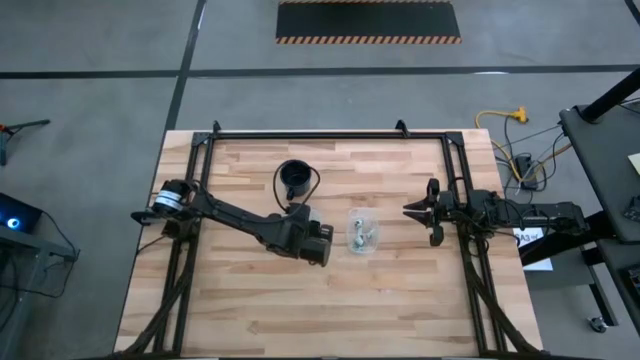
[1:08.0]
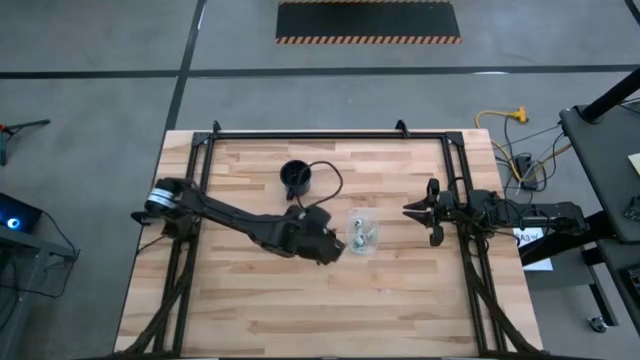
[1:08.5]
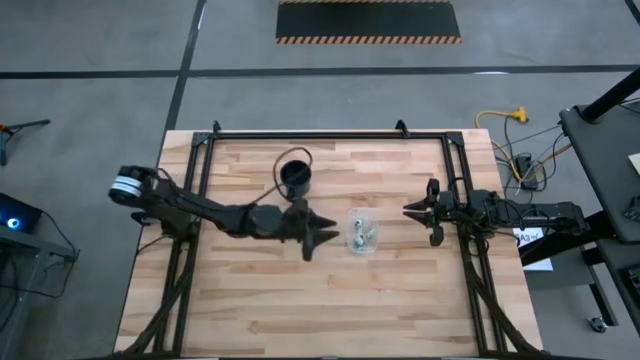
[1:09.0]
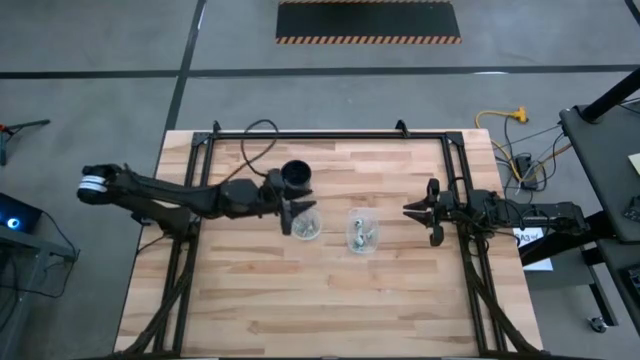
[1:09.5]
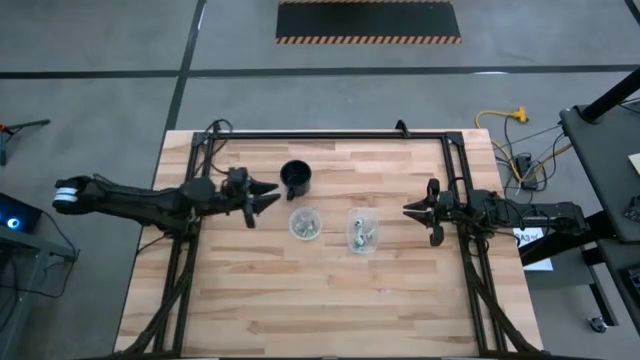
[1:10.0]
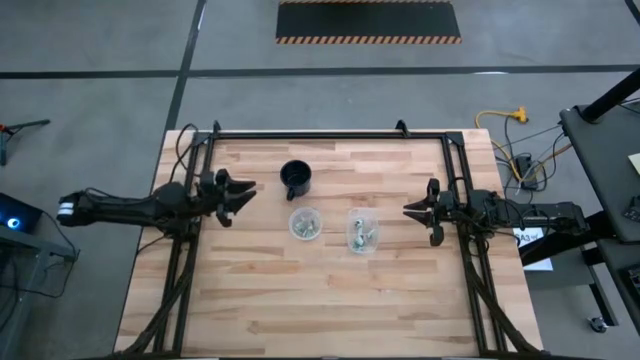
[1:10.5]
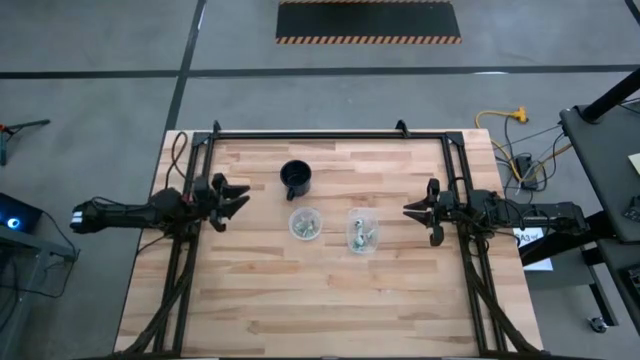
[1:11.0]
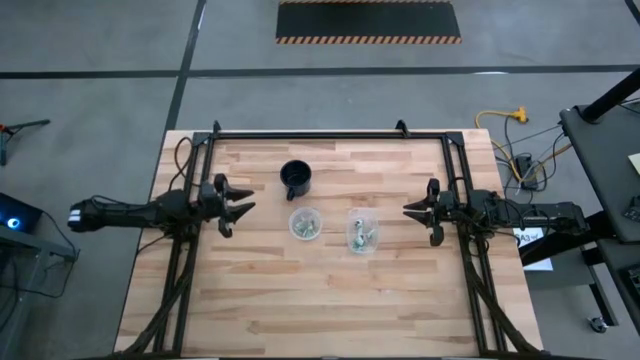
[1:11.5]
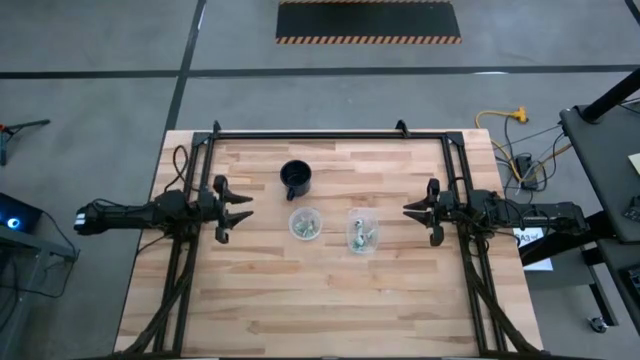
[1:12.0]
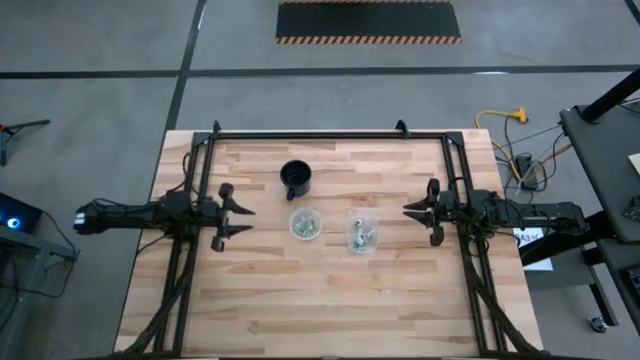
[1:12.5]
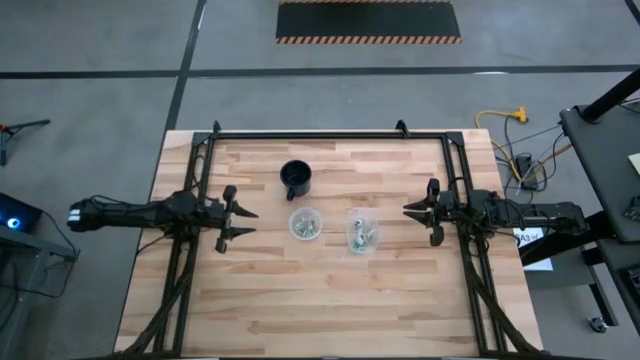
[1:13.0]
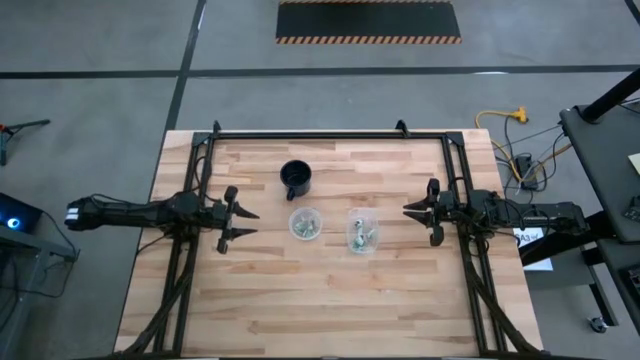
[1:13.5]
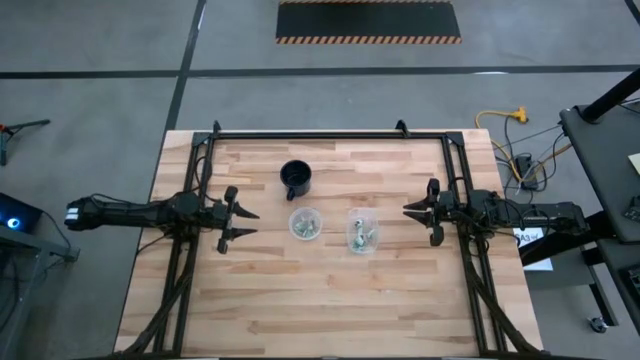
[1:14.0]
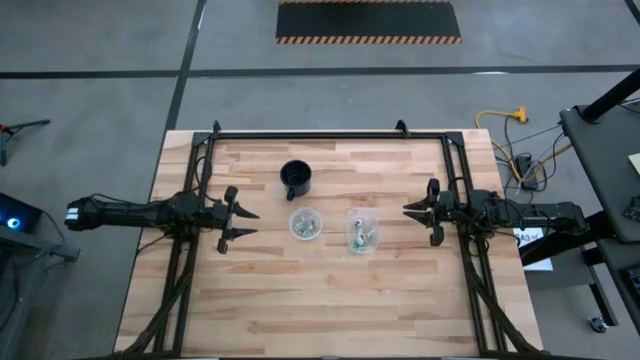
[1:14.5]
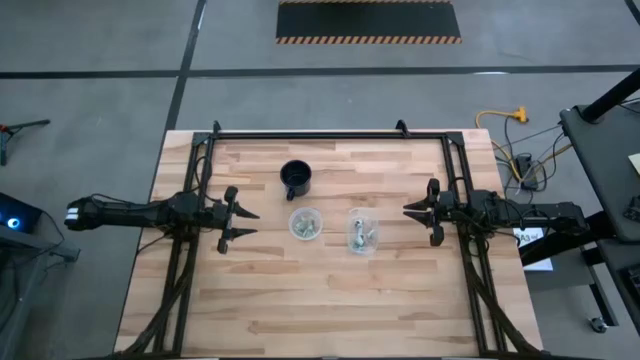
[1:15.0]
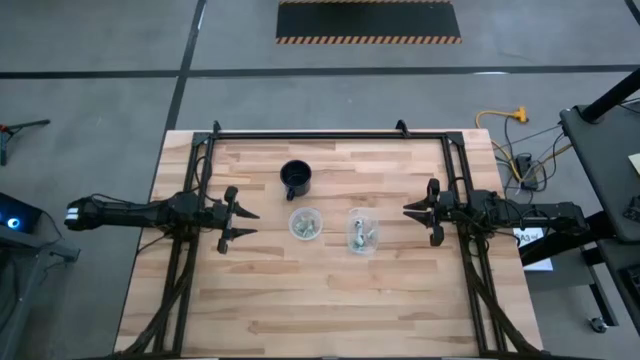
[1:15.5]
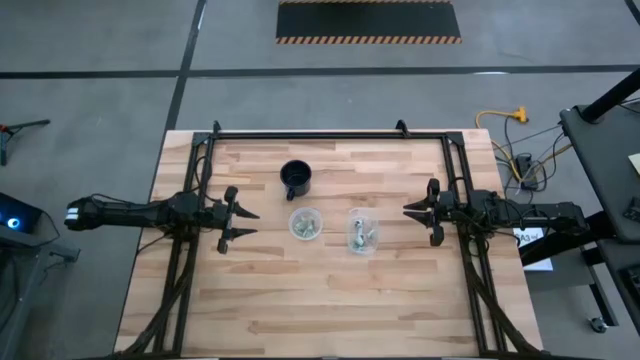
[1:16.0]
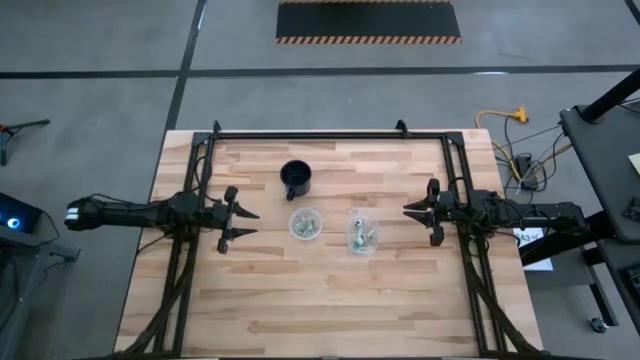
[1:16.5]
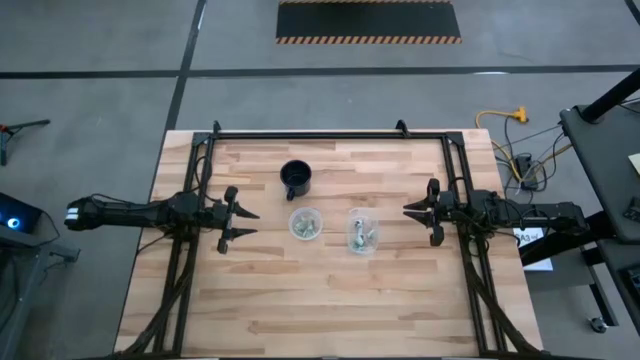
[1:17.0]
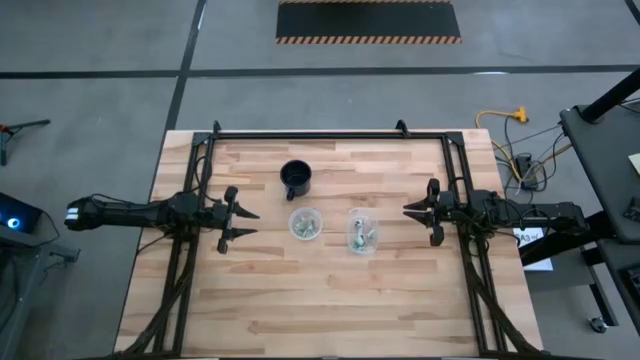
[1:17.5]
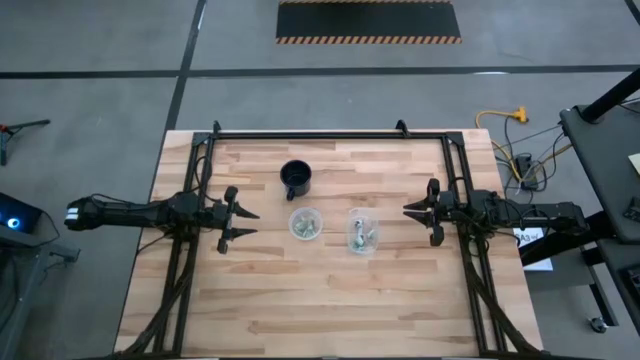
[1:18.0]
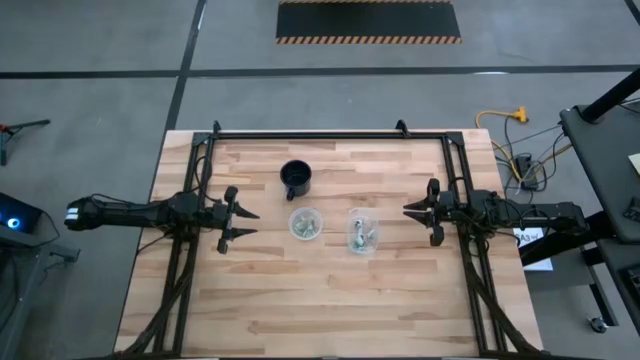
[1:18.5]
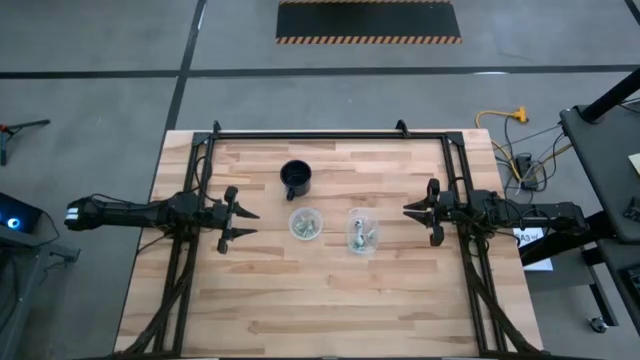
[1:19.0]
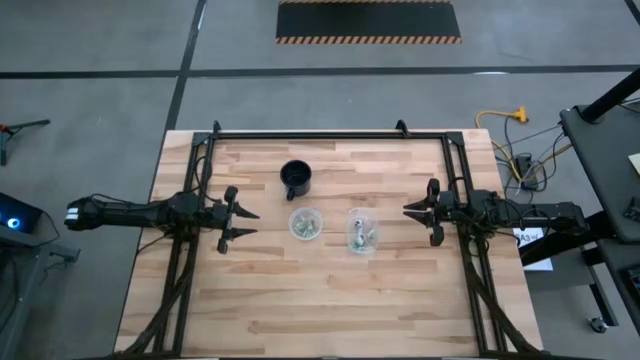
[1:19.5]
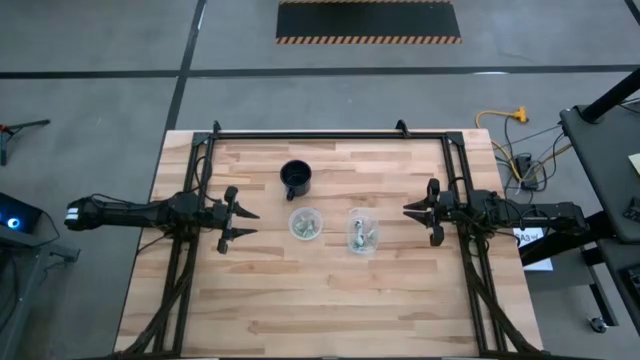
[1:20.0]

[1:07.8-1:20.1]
Task: Pick and place Stevia / Truvia into bins
Return to Home Position

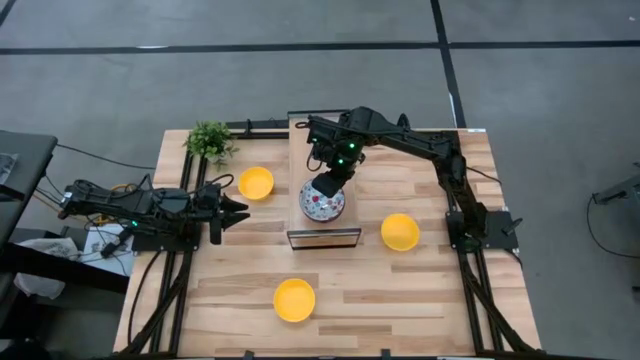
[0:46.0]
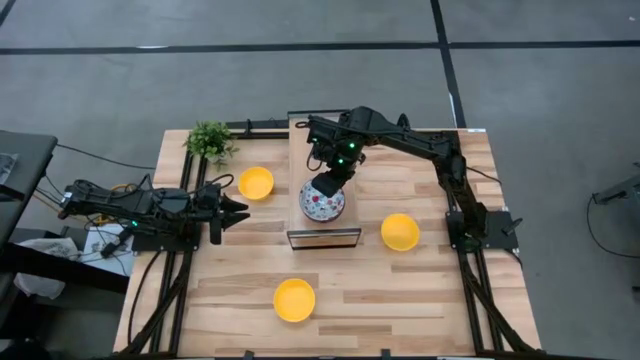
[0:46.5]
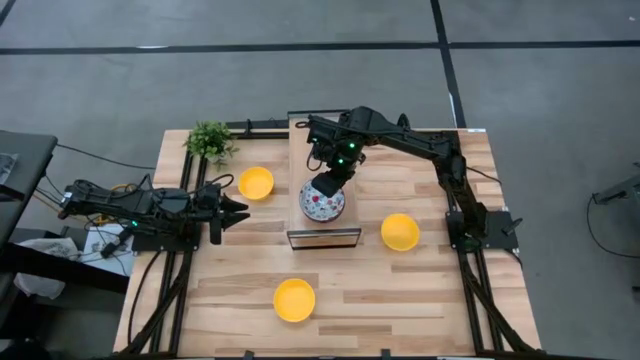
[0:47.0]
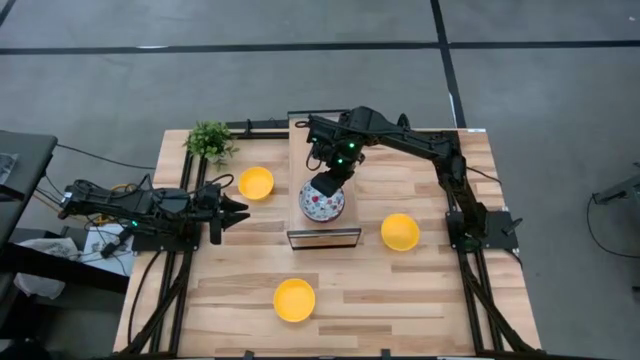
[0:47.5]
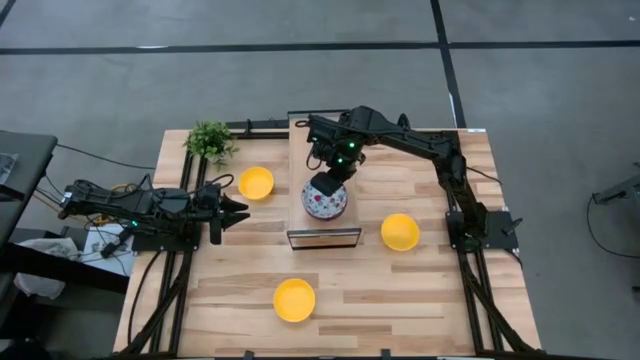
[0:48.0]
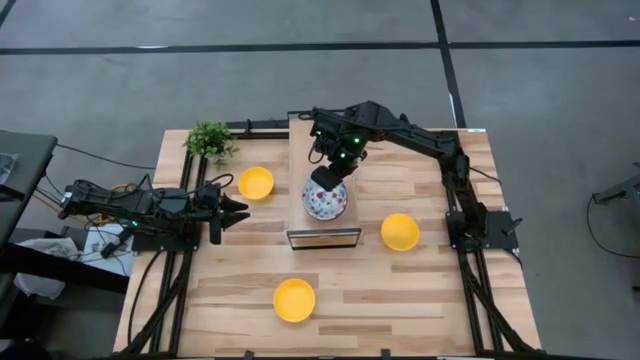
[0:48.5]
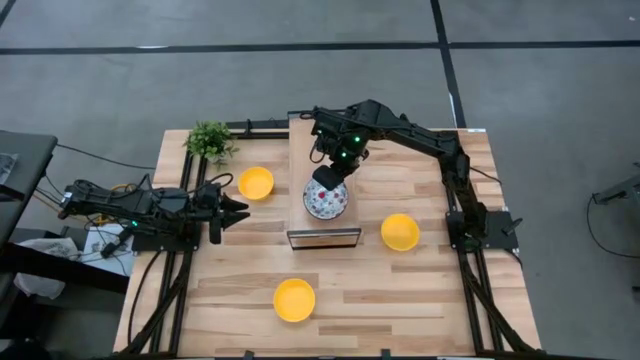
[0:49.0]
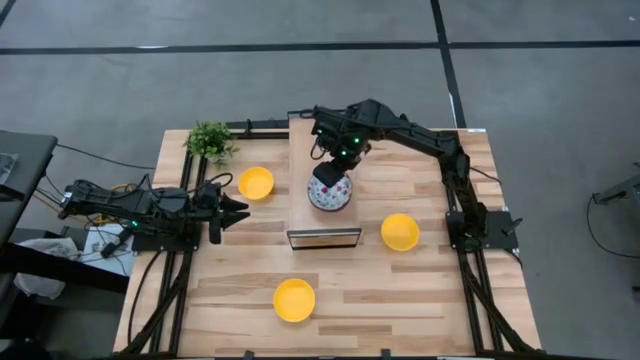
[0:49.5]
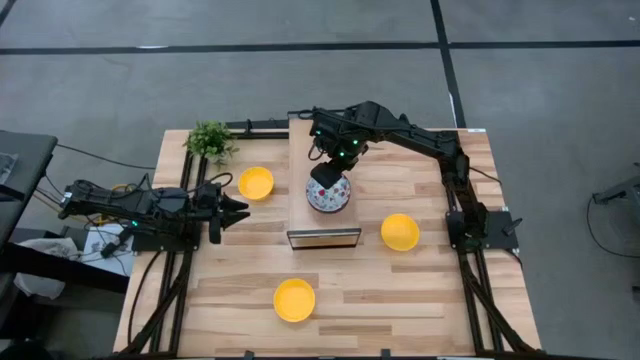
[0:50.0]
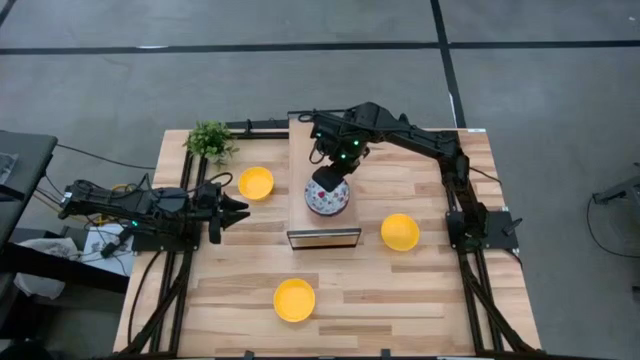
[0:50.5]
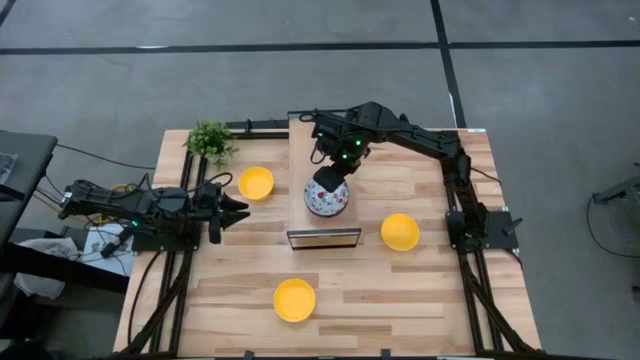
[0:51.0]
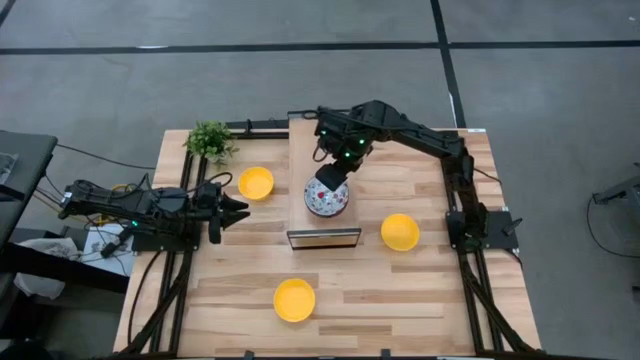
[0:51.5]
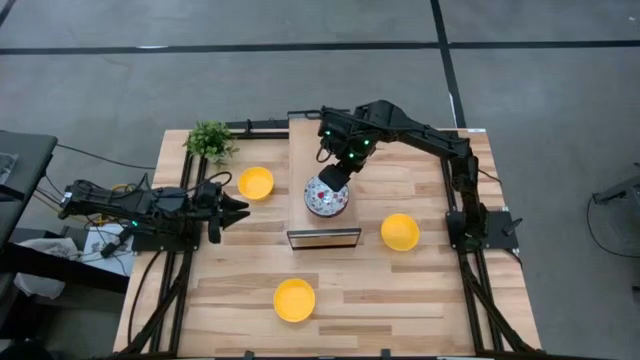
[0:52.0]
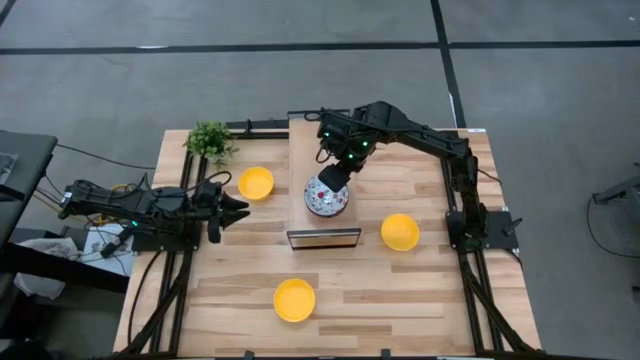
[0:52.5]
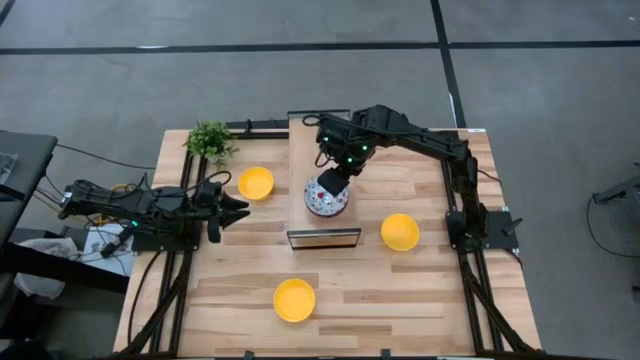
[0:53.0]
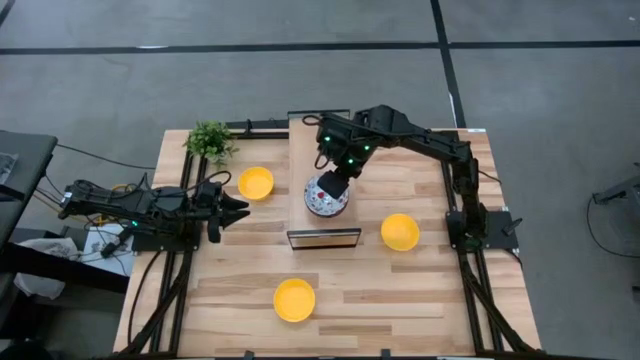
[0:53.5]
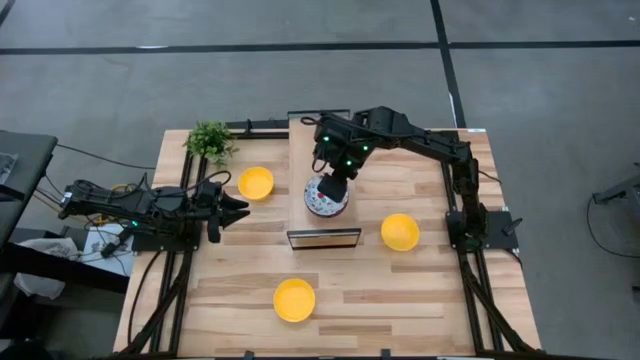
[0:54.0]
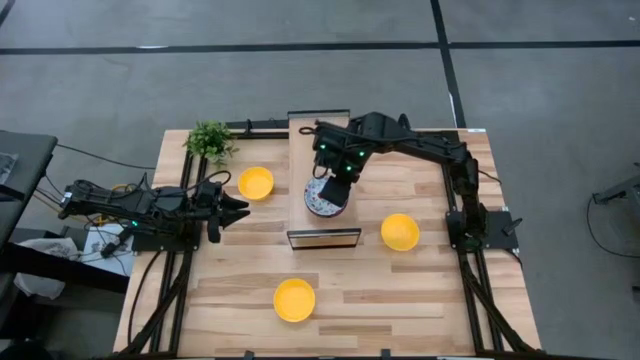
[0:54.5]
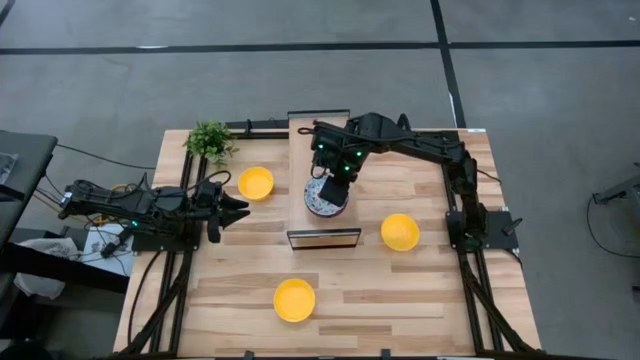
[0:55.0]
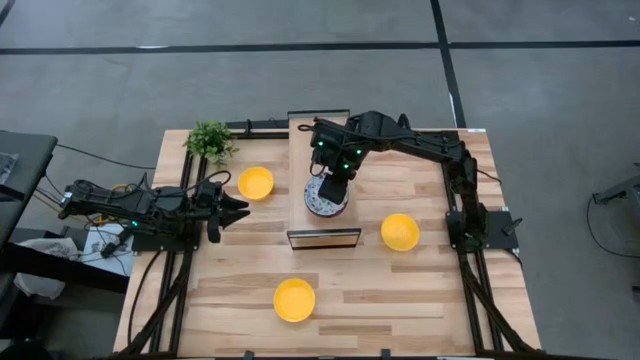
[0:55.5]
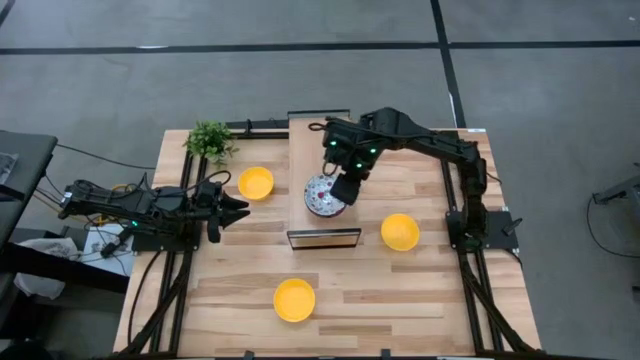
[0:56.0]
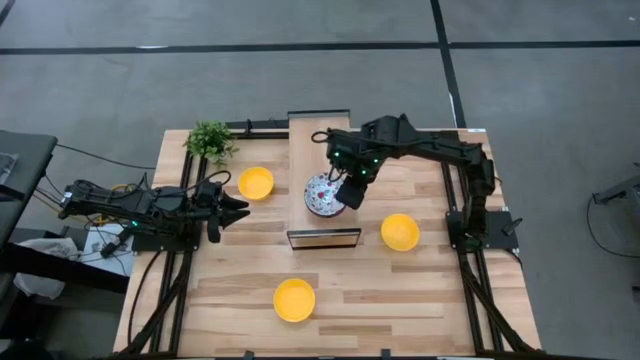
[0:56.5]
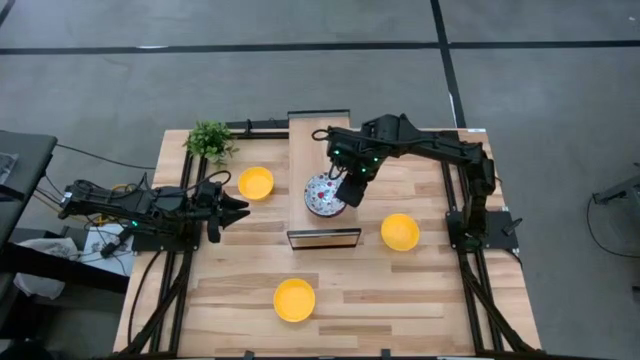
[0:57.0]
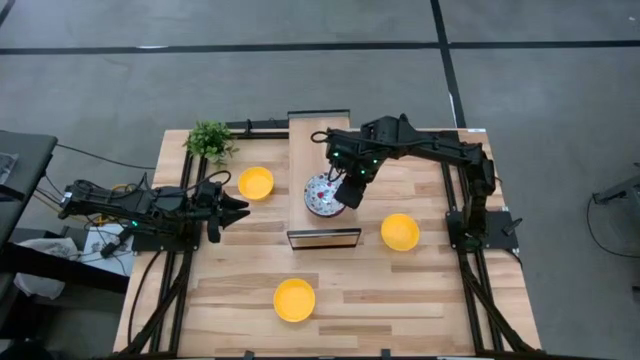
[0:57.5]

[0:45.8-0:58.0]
Task: Pick & Place Mini bowls
Stack the white patterned bowl on top of the white patterned bowl on the shelf
